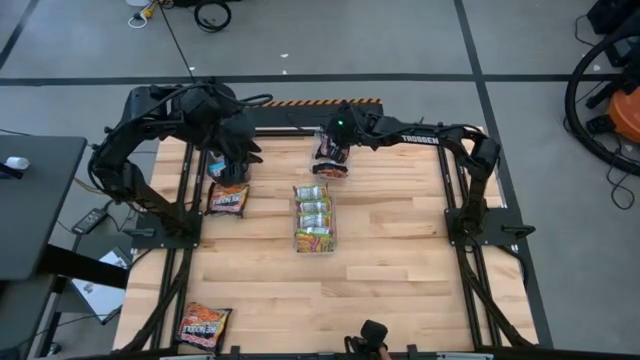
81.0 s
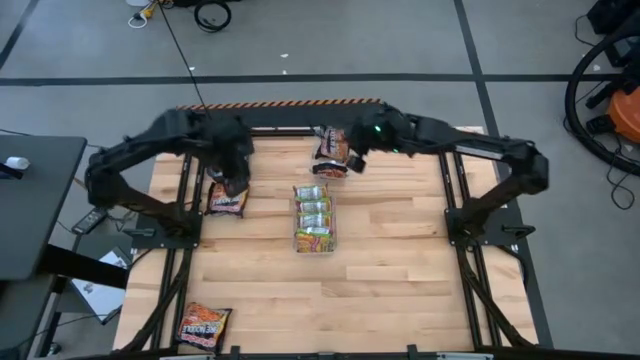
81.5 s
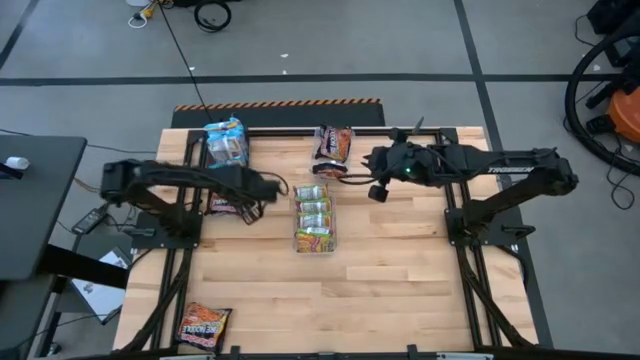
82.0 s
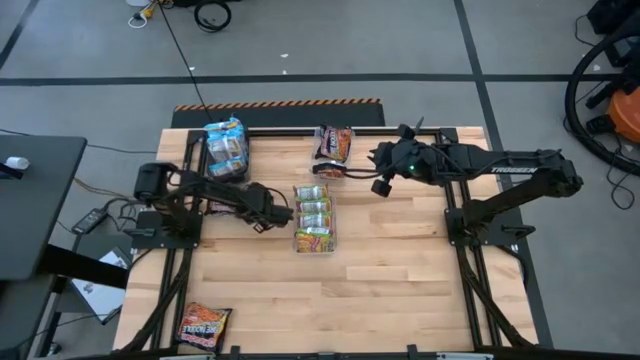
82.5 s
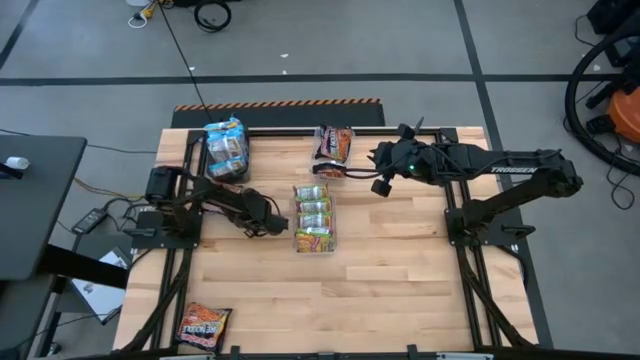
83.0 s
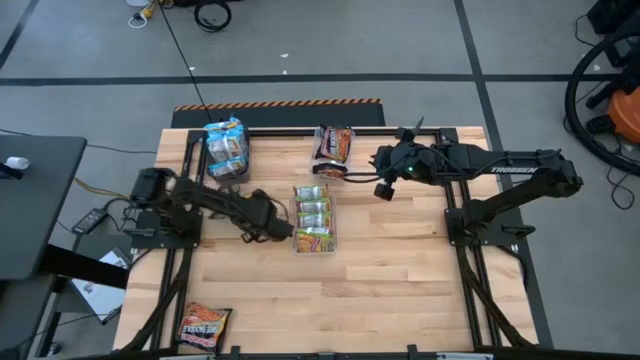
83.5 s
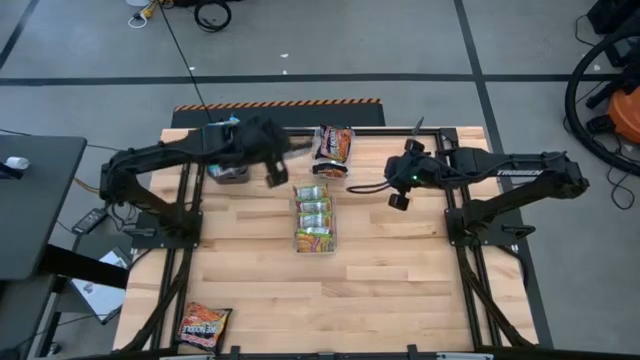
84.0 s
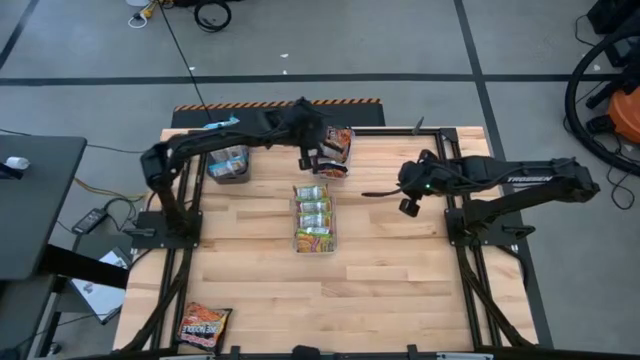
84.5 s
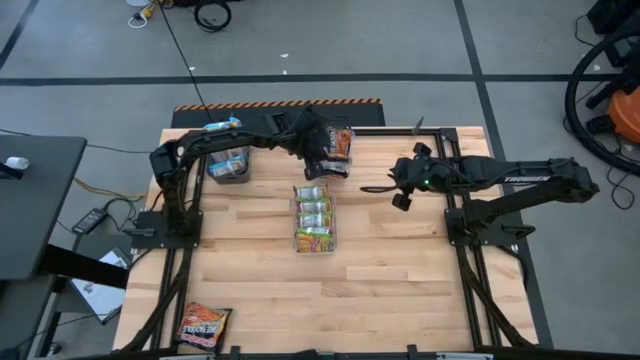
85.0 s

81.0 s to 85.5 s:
Task: Sort Maruchan noodles
Put the black noodle pack into the top transparent bin

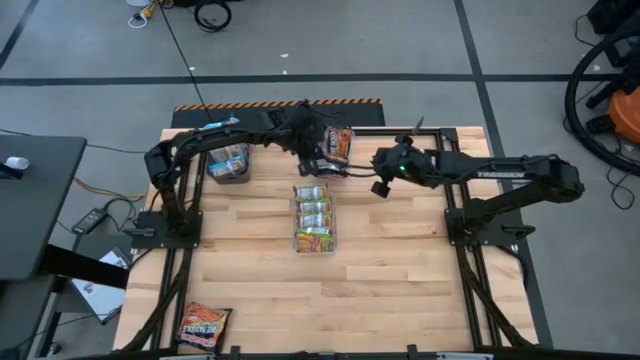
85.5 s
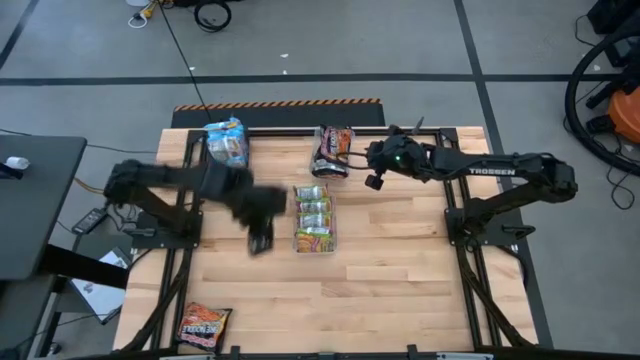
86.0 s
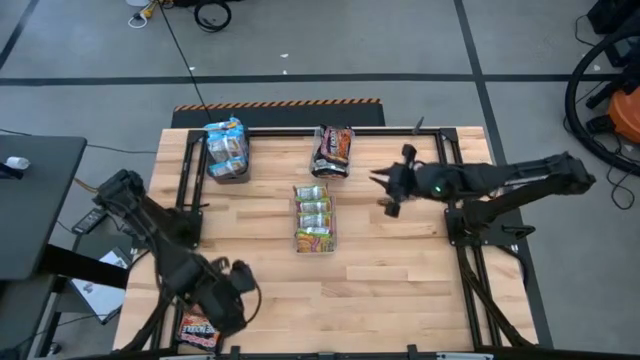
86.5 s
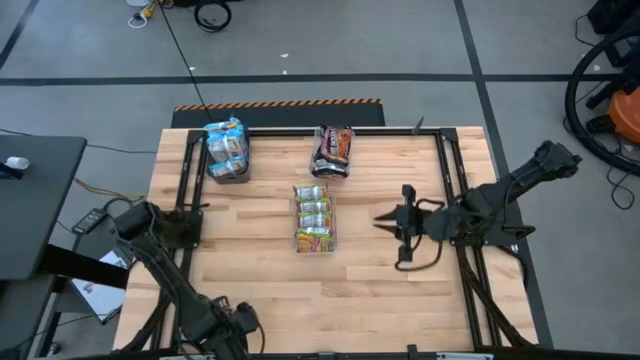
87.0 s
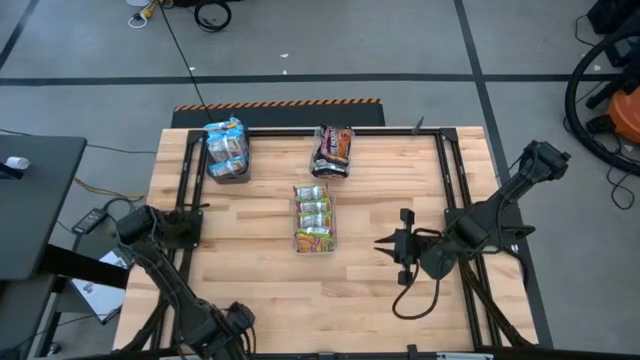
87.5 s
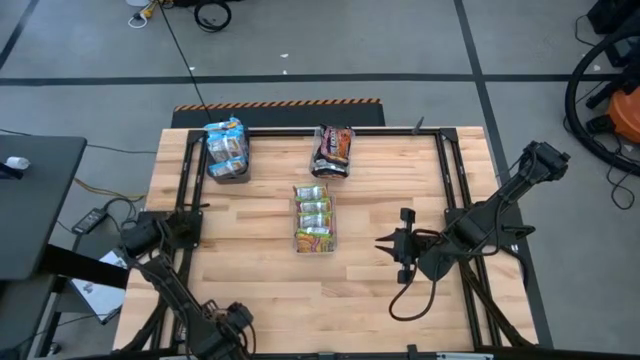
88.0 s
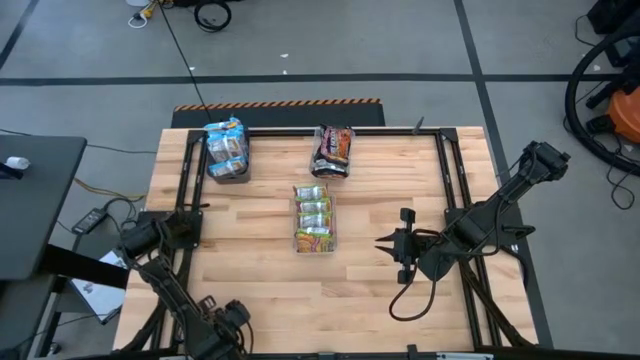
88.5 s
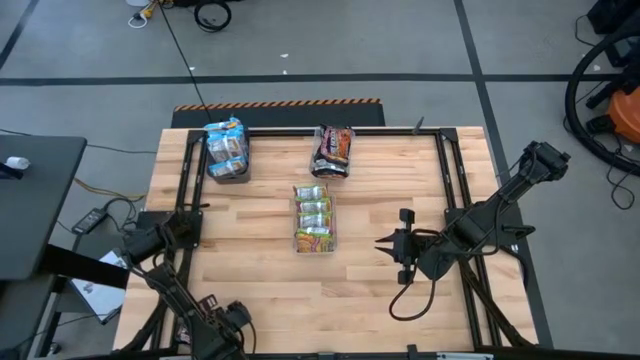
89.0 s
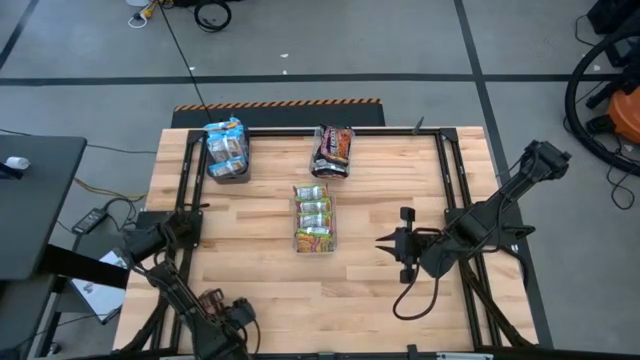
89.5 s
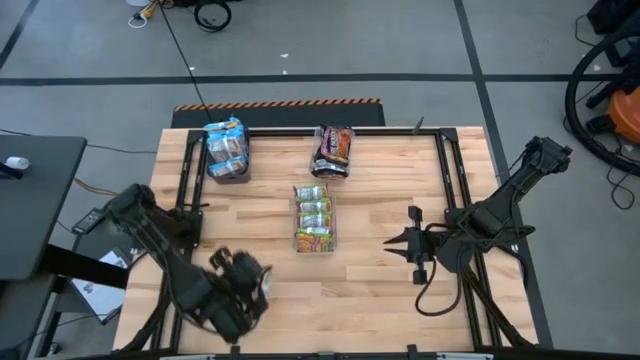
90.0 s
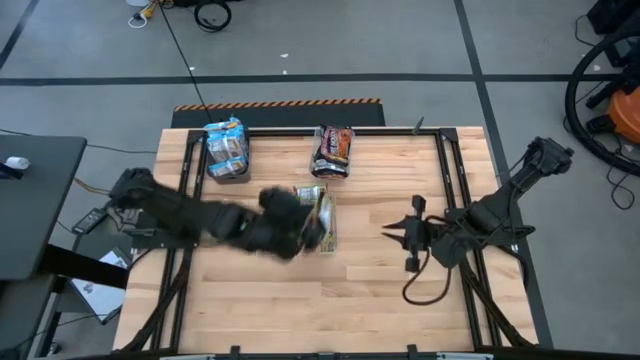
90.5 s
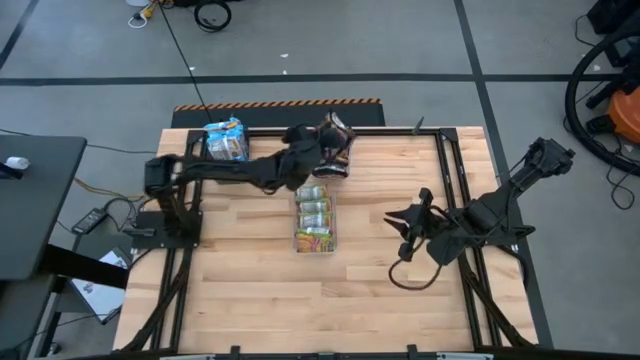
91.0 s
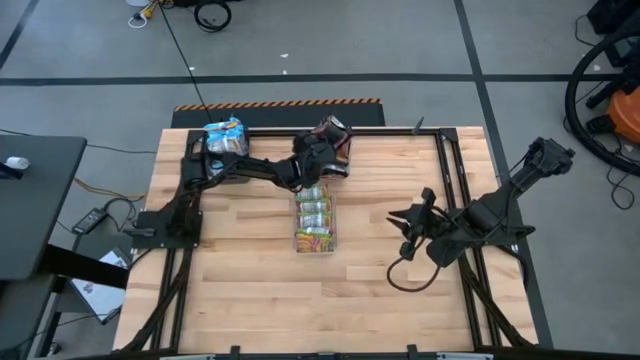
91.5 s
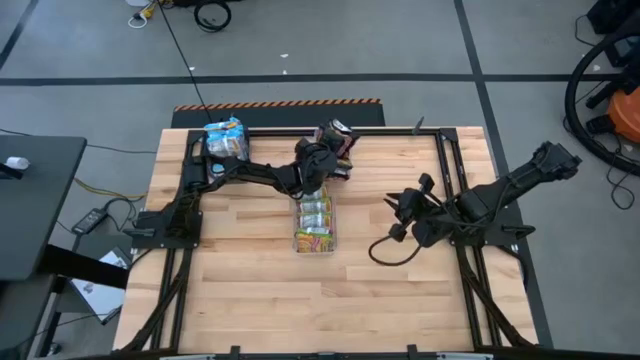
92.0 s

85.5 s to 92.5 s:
Put the black noodle pack into the top transparent bin

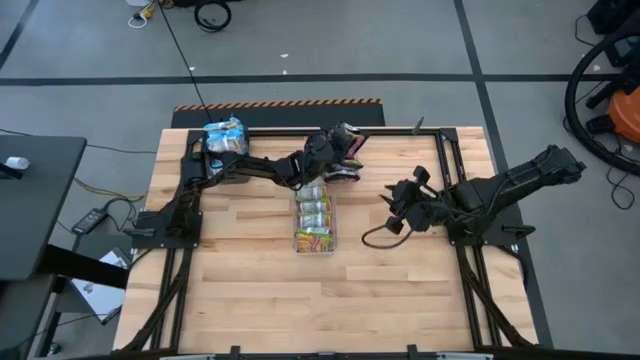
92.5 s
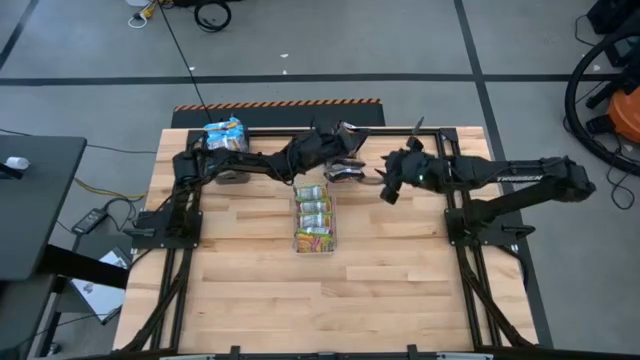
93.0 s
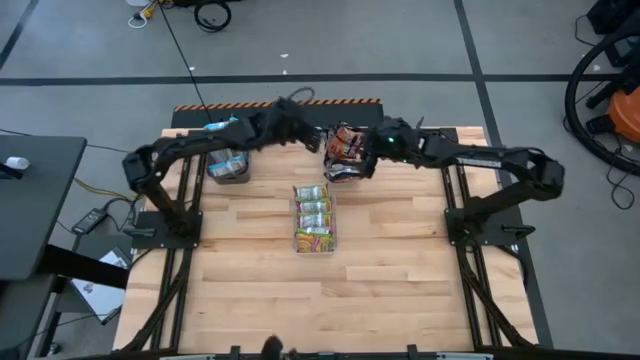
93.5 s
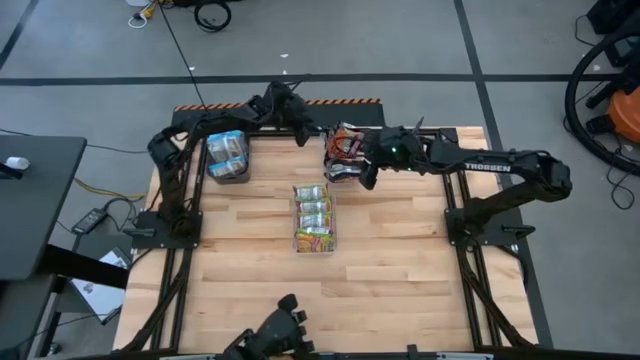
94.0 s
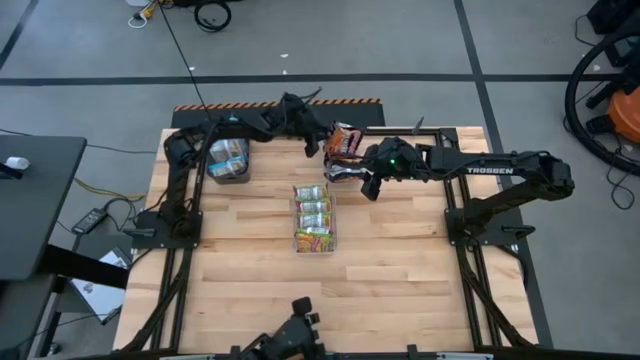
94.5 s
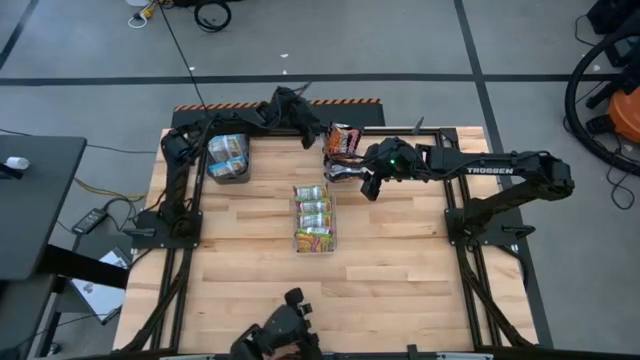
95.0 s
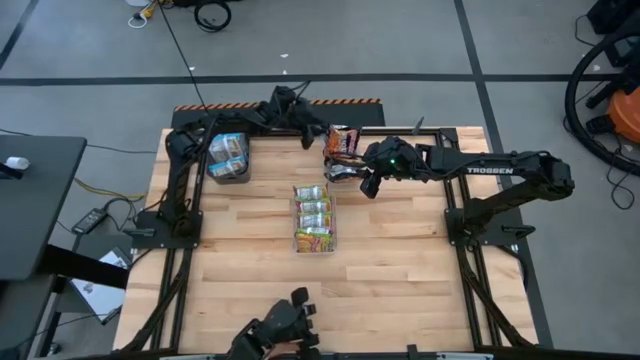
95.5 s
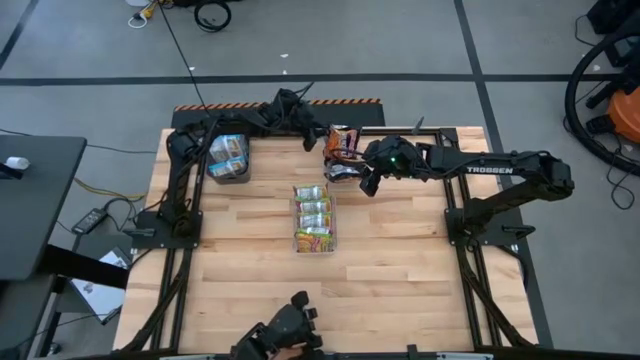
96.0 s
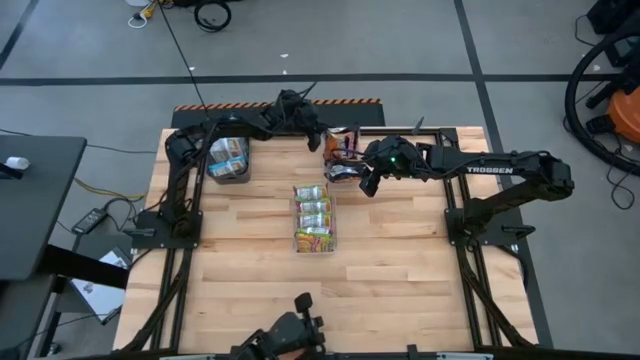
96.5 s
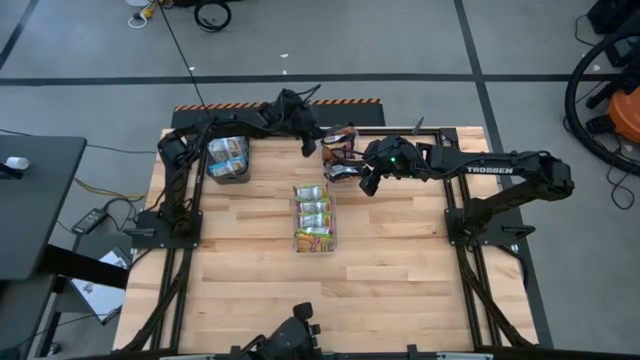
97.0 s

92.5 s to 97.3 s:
Adjust the black noodle pack on the top transparent bin

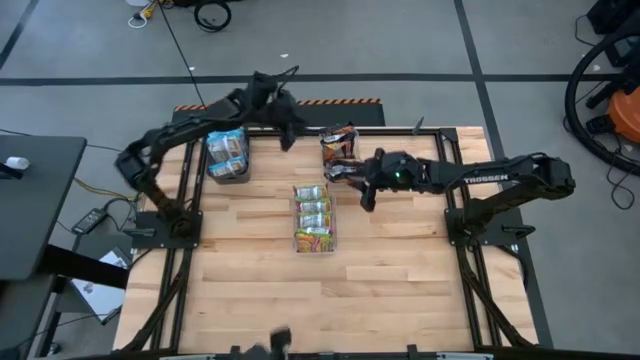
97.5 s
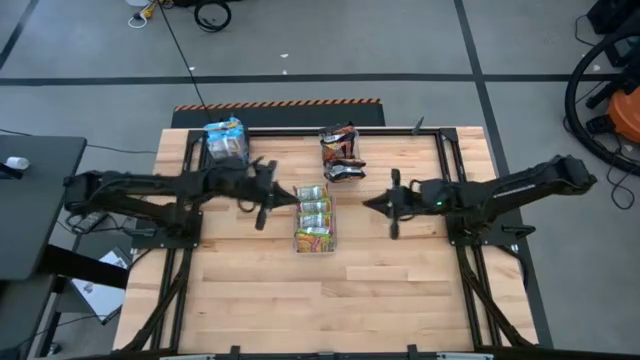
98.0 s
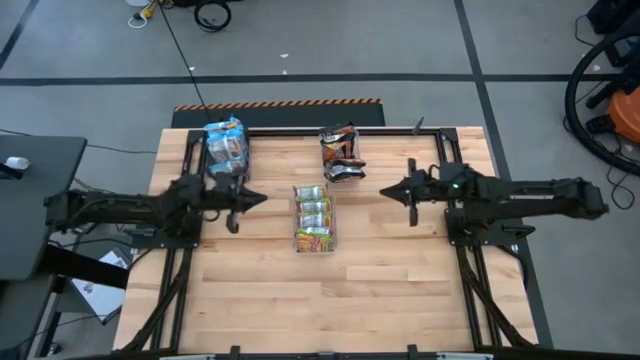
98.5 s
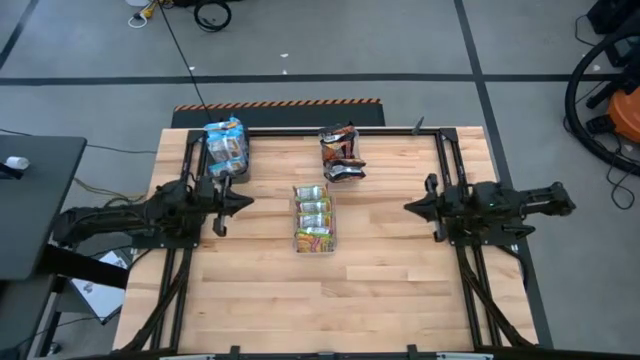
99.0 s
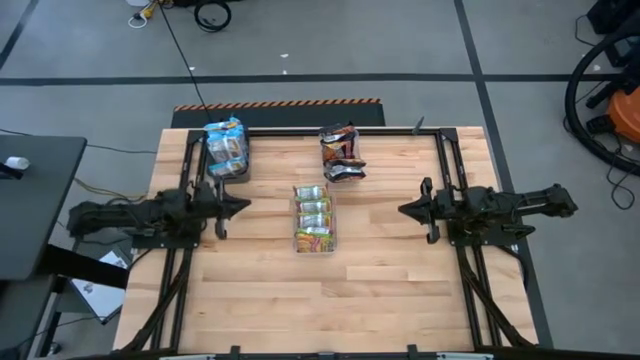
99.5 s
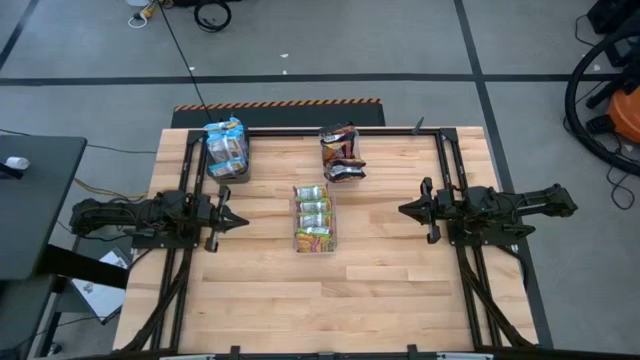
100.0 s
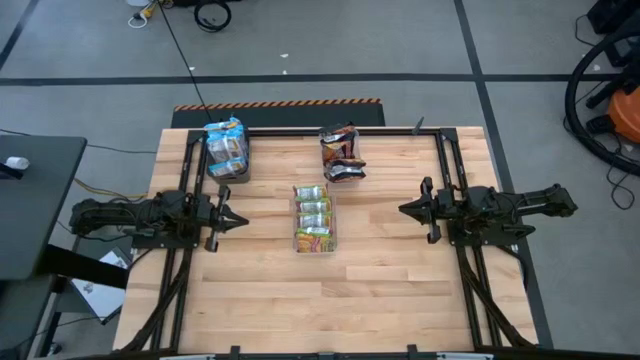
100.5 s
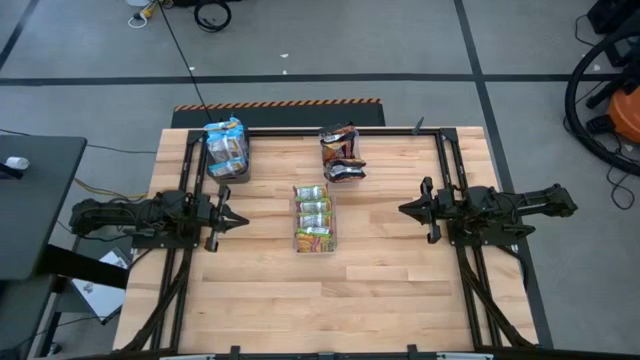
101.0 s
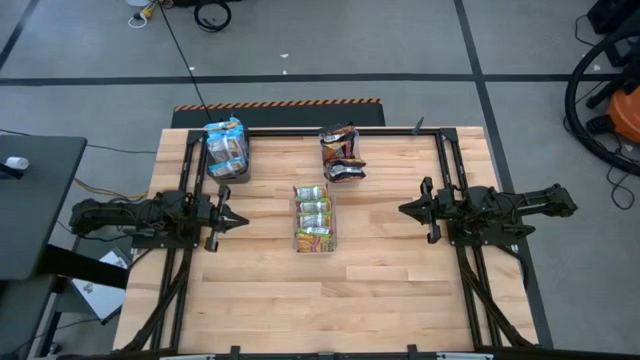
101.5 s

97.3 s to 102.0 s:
Return to Home Position
